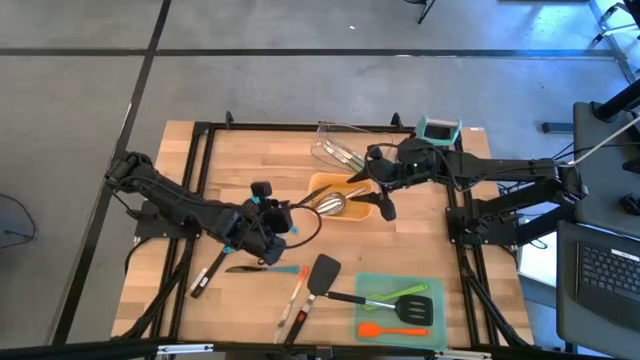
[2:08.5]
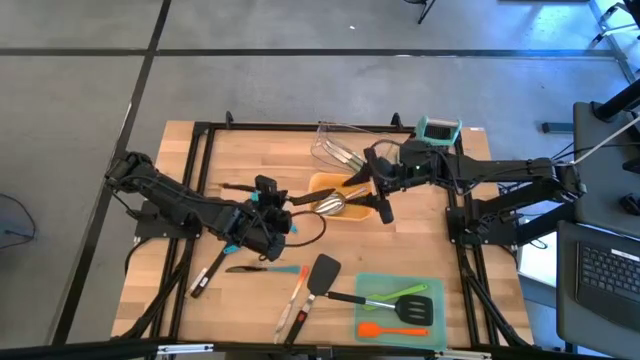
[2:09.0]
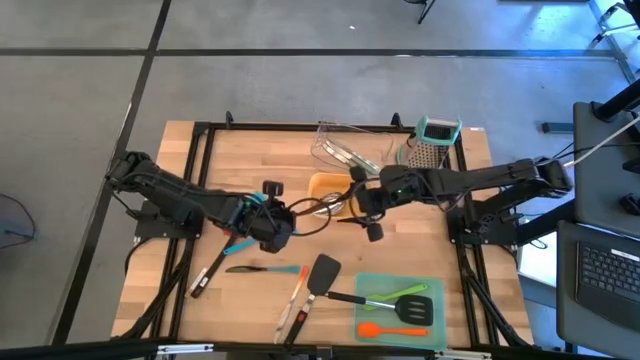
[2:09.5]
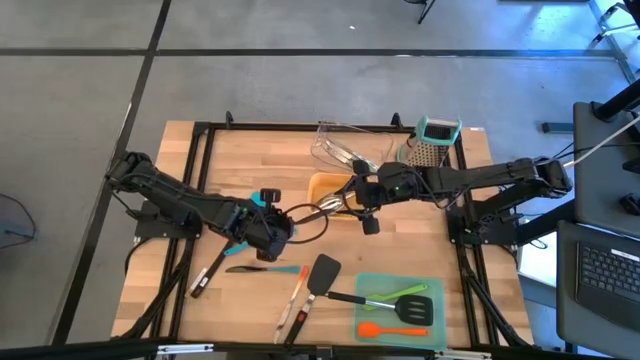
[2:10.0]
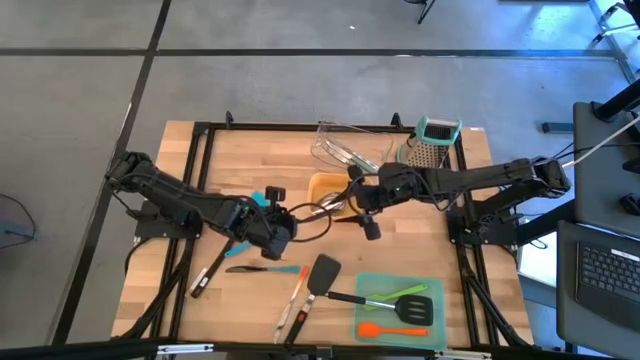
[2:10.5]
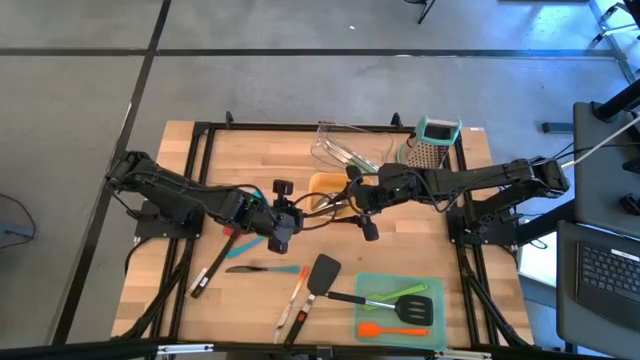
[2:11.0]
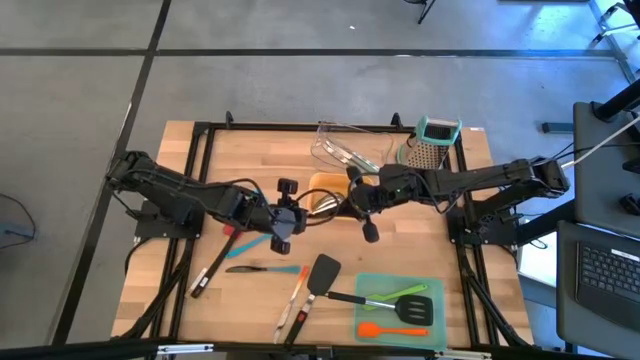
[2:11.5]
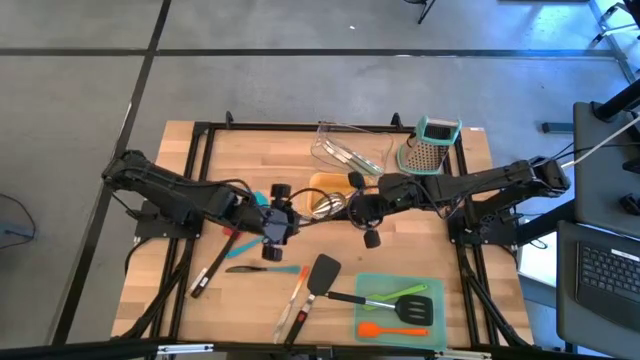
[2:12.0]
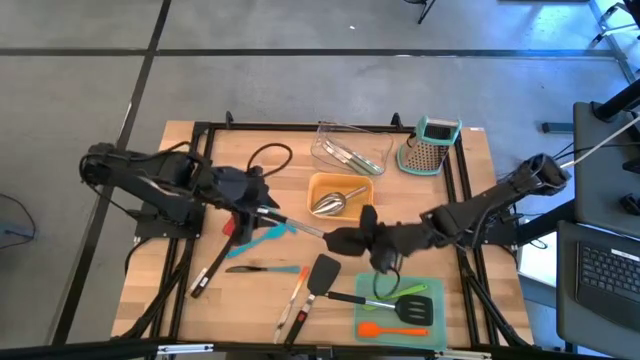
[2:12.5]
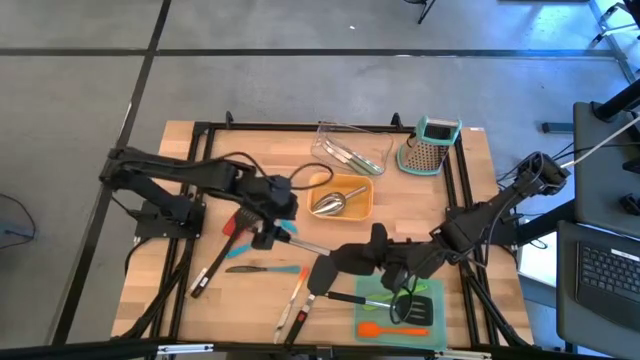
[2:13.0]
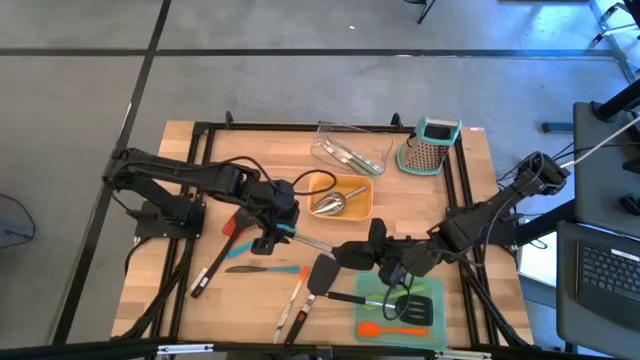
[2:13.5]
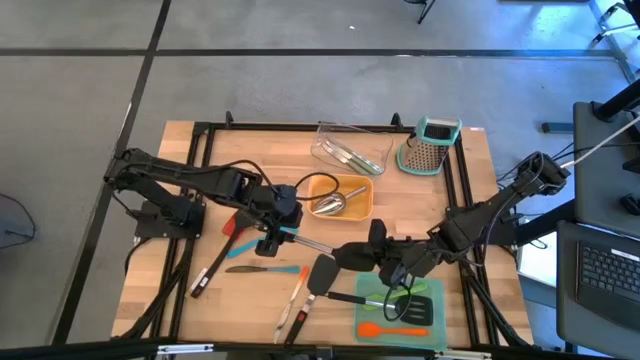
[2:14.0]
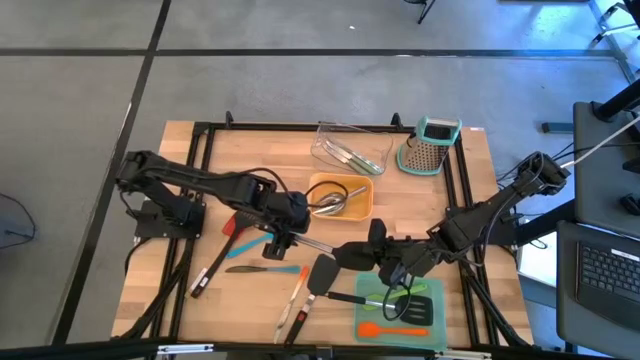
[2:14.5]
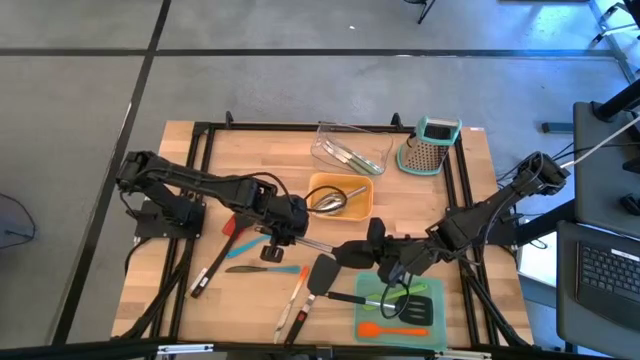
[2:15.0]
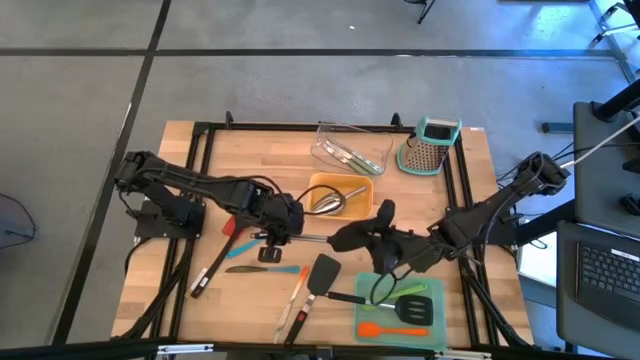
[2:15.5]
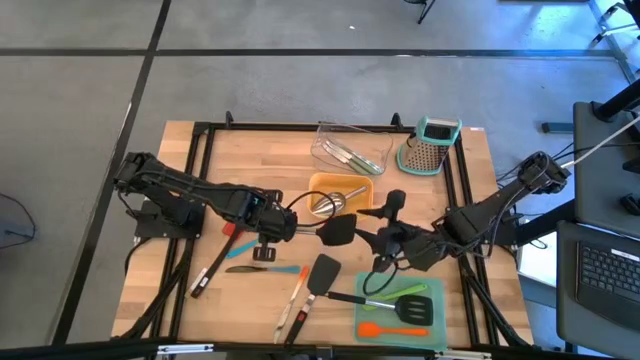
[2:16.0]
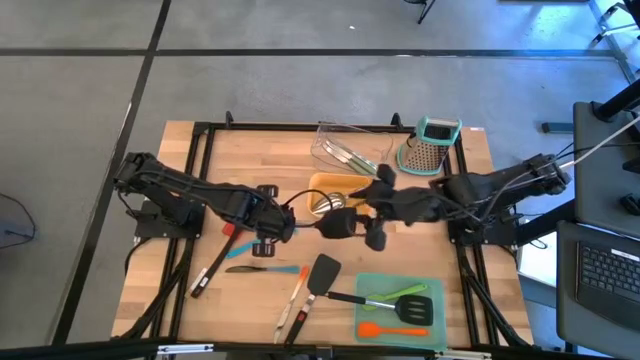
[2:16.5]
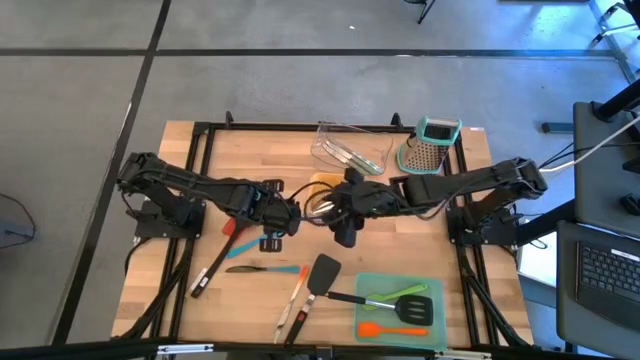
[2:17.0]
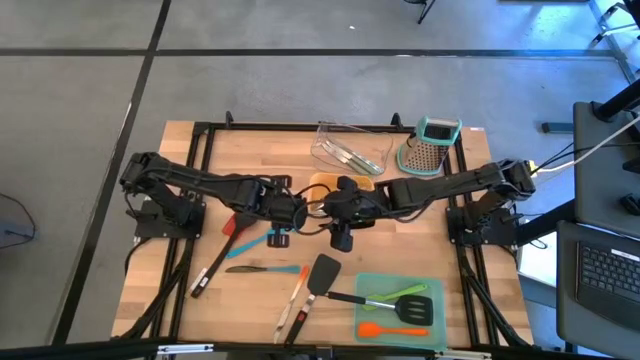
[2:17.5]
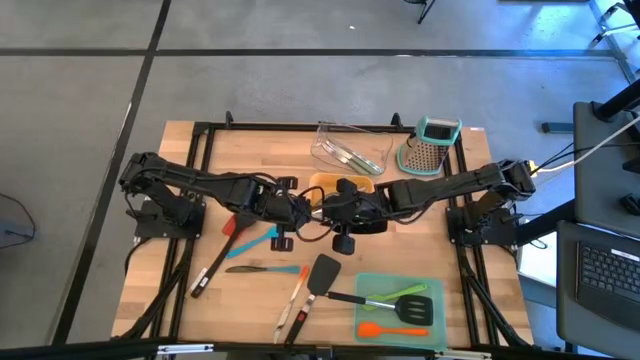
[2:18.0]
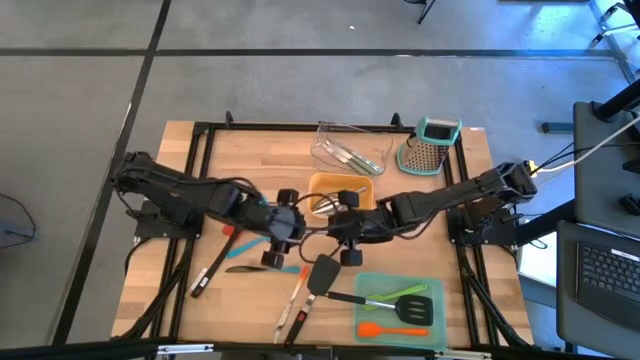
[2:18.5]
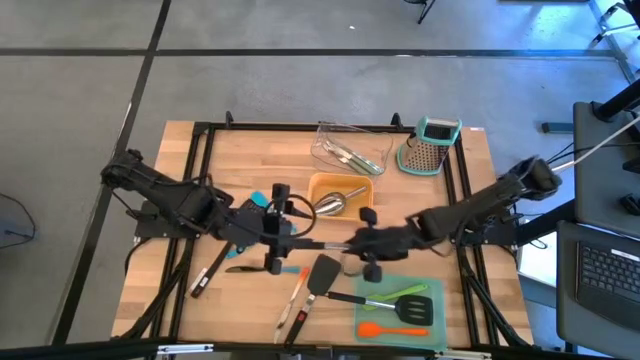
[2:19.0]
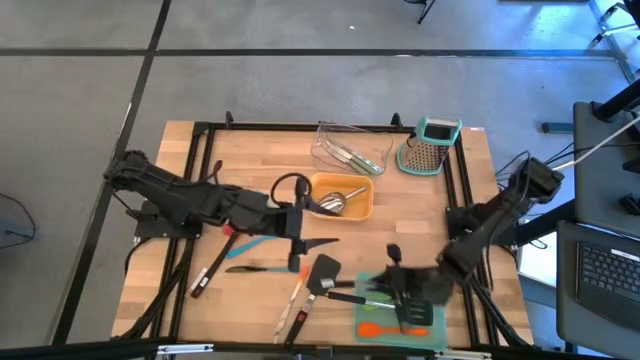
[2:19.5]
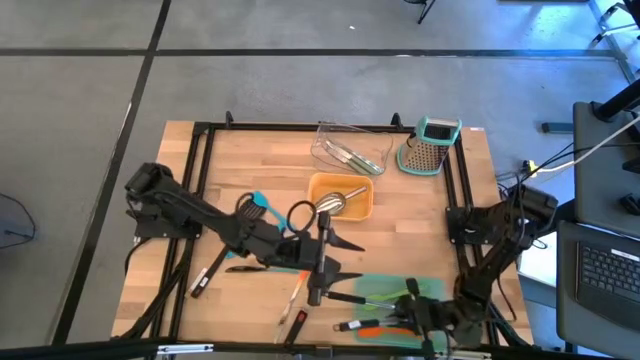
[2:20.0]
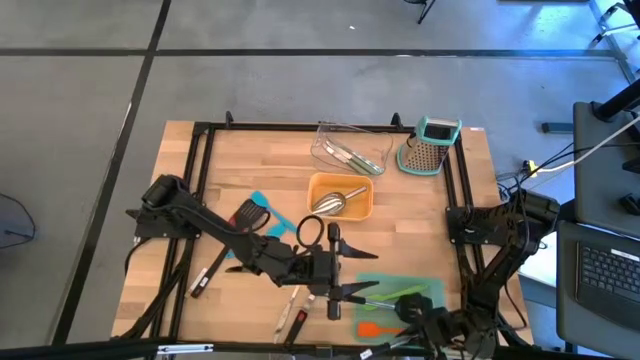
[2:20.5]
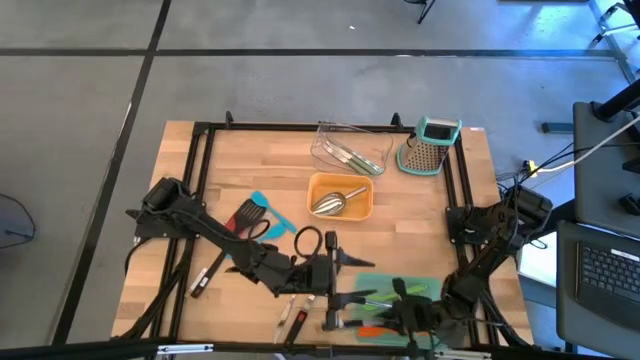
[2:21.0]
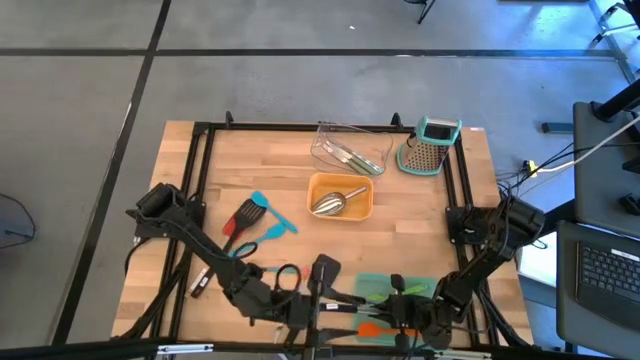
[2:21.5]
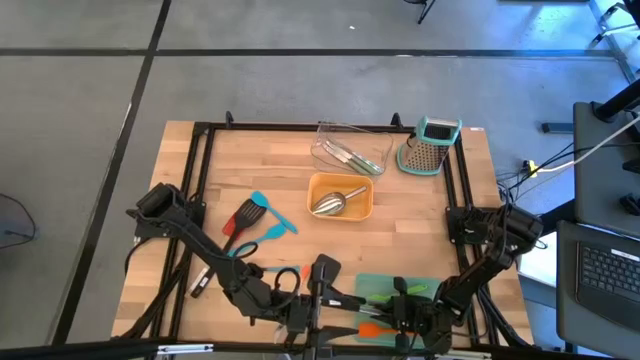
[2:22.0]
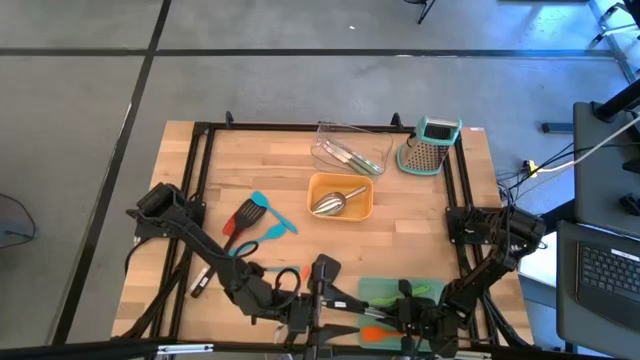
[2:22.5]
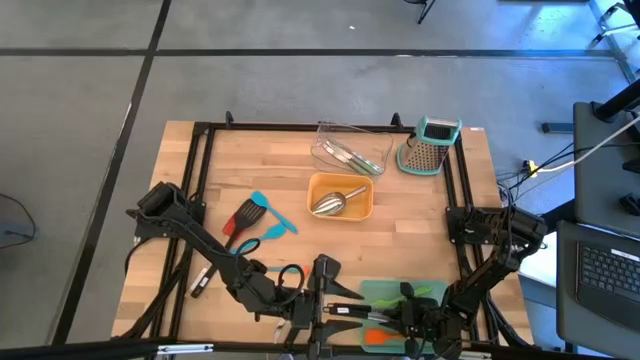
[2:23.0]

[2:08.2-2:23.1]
Task: Pick & Place Kitchen Items
Put the black spatula into the green bin

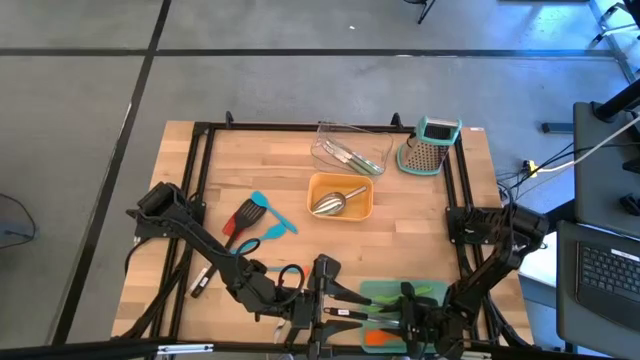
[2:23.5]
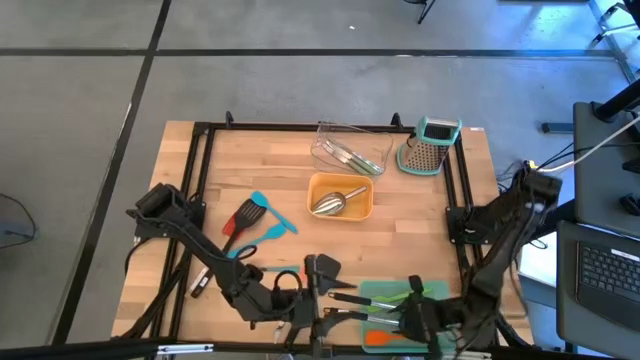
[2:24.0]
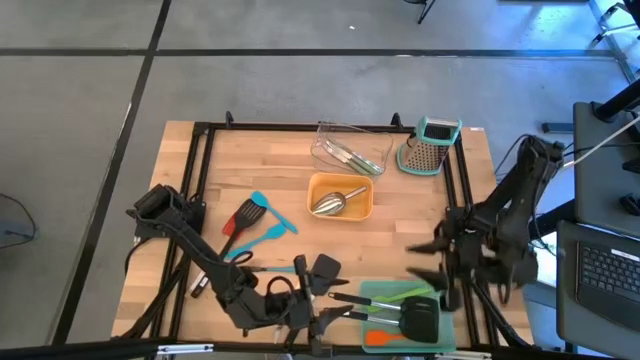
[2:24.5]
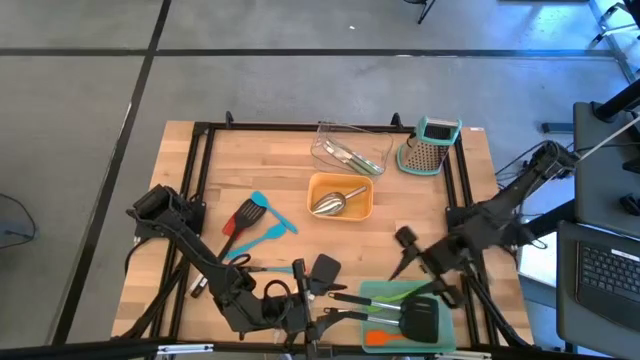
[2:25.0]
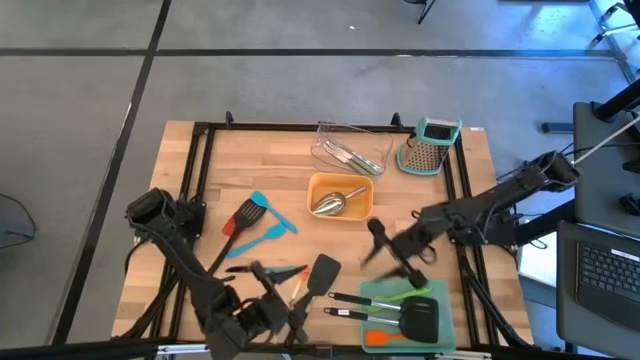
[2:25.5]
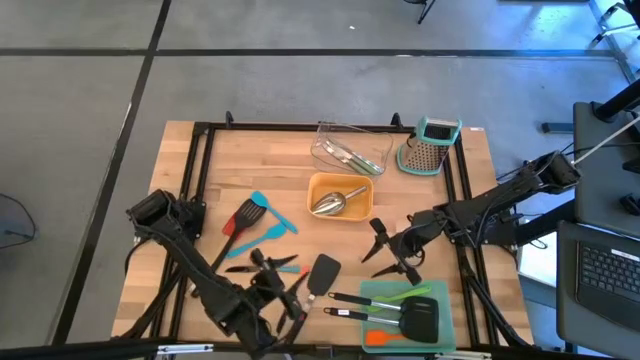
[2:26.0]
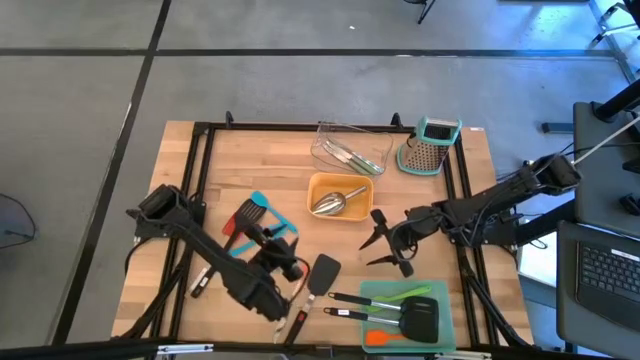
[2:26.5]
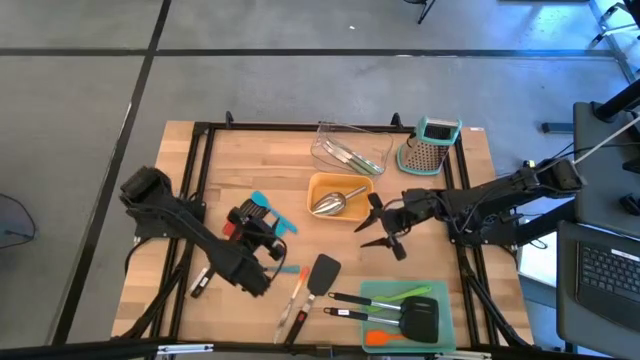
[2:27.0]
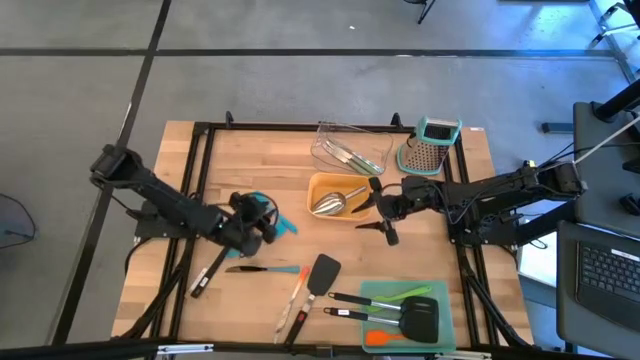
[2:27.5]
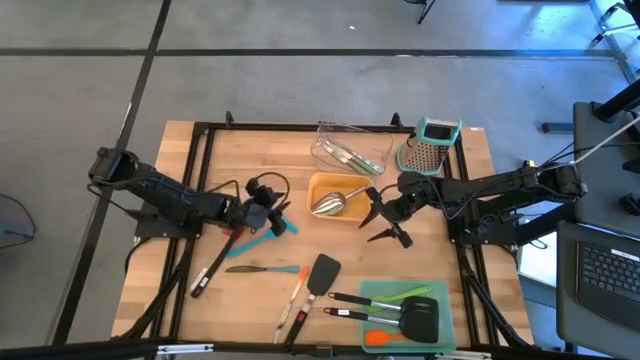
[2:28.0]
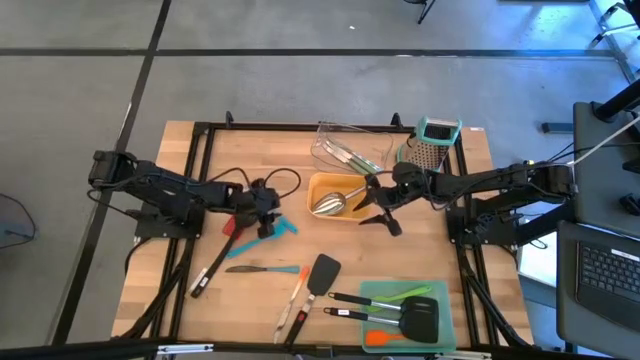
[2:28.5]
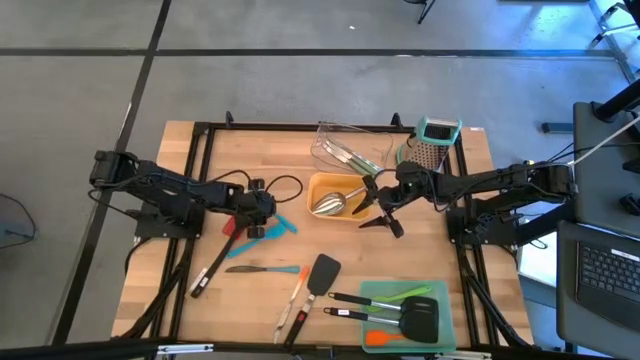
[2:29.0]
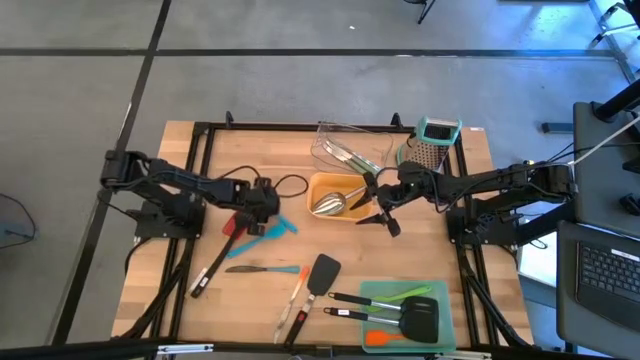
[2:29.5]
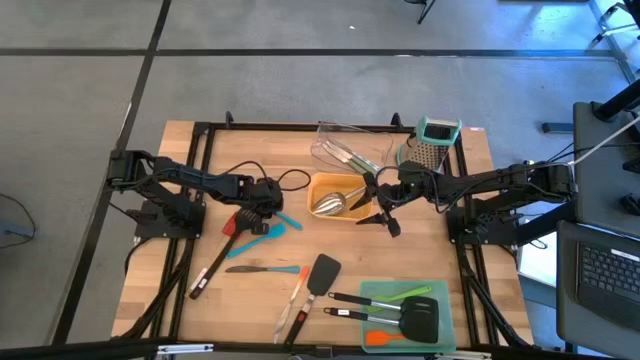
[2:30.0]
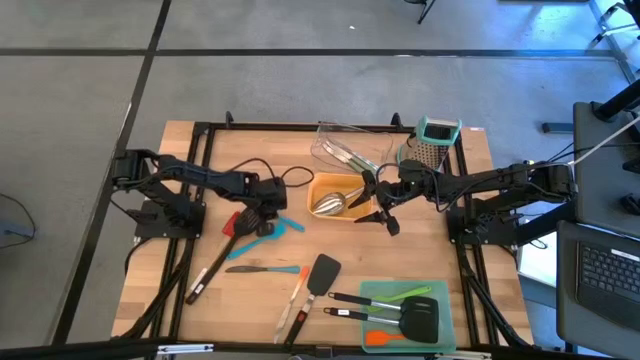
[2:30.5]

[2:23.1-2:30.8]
Put the top blue silicone spatula into the green bin
